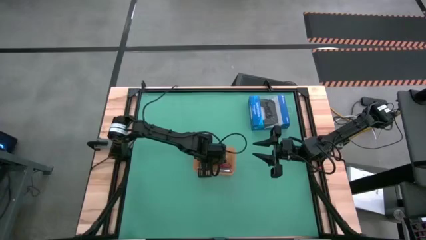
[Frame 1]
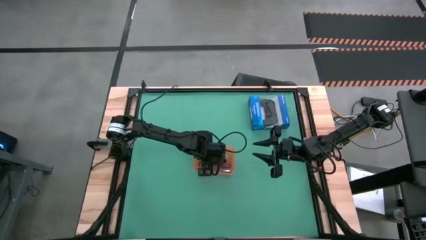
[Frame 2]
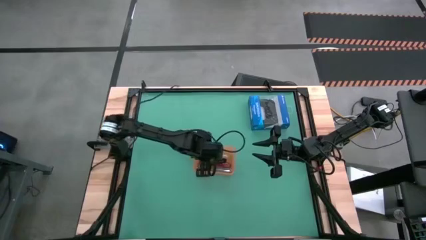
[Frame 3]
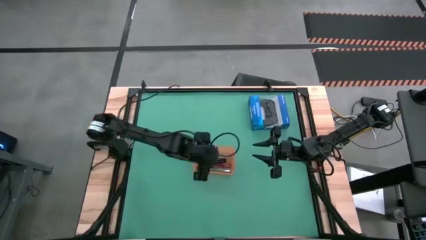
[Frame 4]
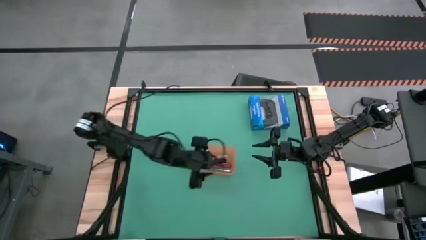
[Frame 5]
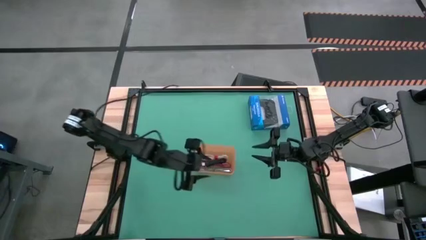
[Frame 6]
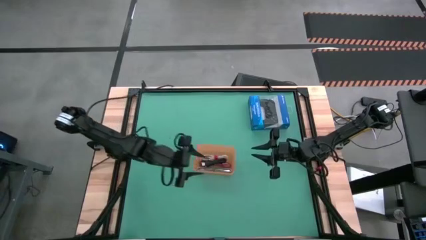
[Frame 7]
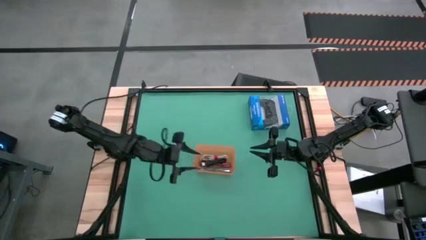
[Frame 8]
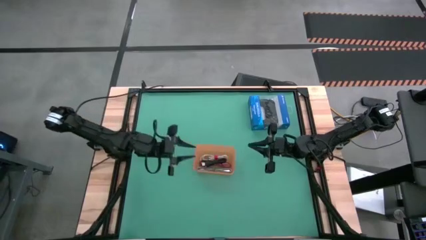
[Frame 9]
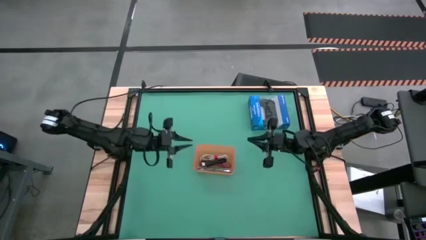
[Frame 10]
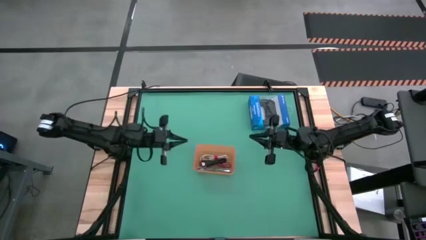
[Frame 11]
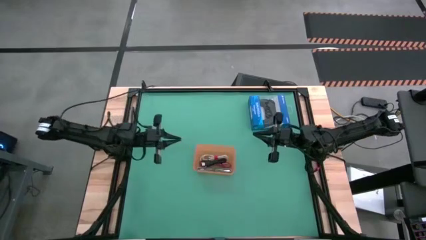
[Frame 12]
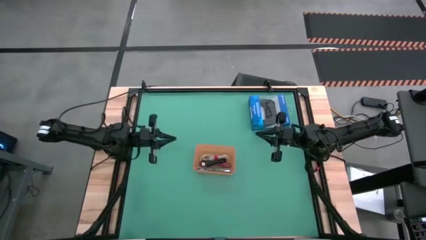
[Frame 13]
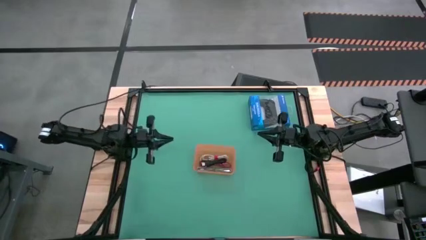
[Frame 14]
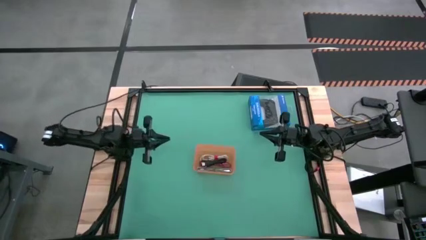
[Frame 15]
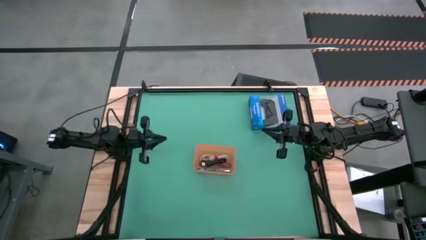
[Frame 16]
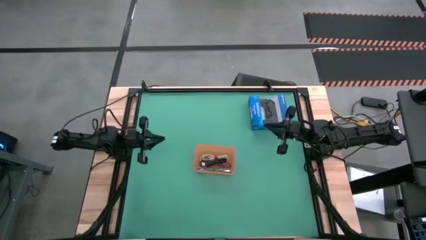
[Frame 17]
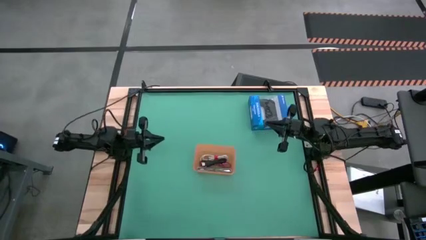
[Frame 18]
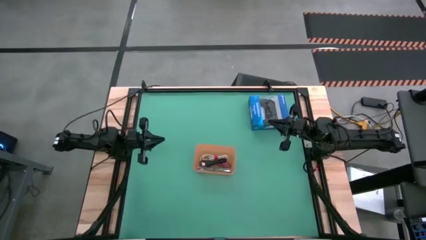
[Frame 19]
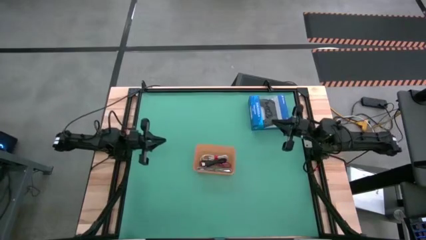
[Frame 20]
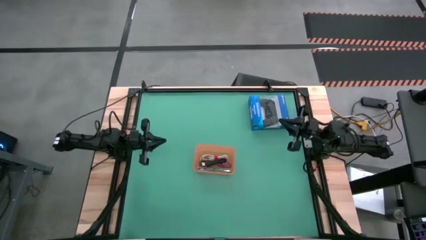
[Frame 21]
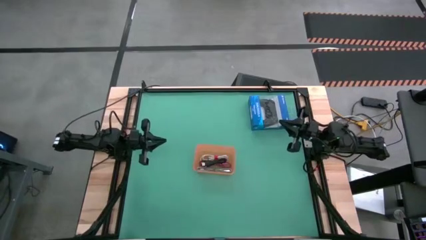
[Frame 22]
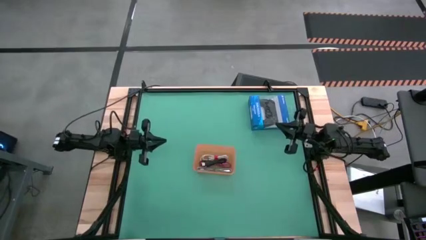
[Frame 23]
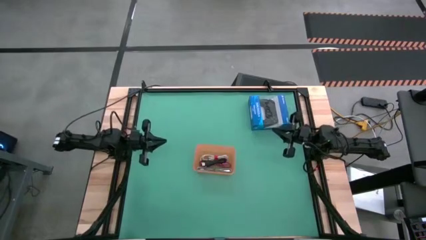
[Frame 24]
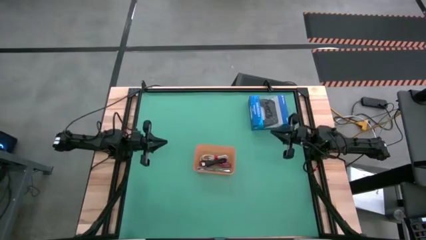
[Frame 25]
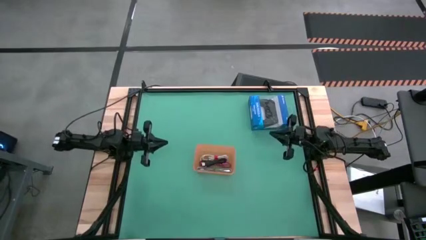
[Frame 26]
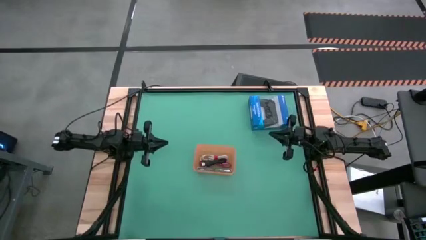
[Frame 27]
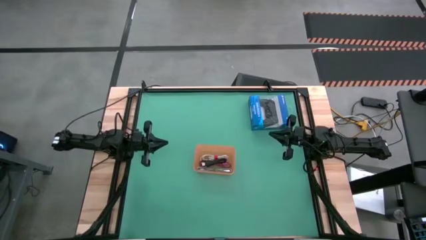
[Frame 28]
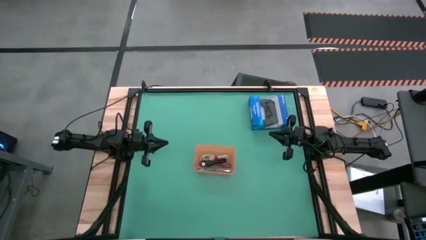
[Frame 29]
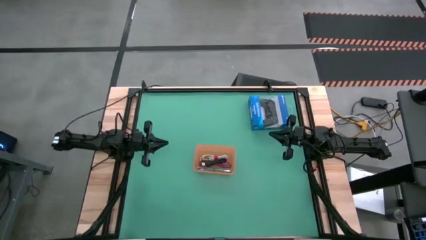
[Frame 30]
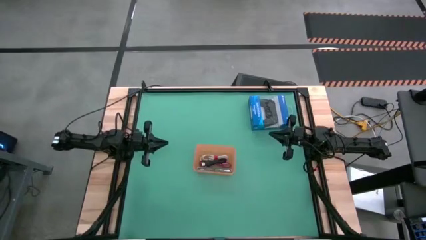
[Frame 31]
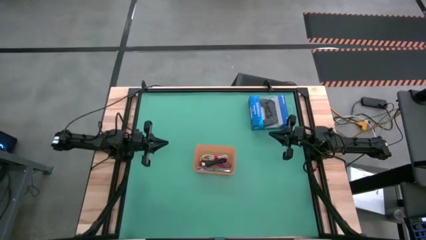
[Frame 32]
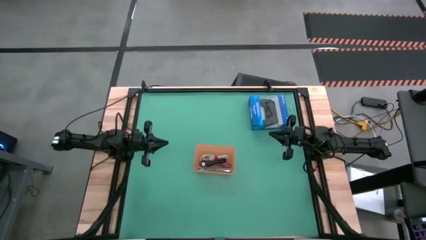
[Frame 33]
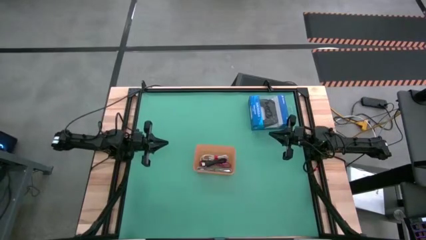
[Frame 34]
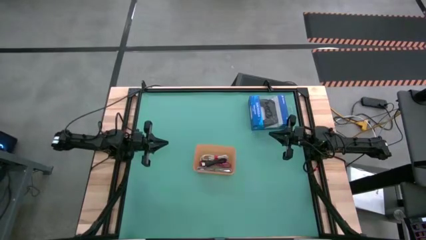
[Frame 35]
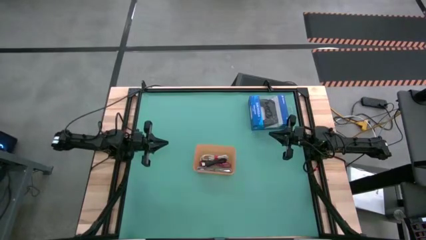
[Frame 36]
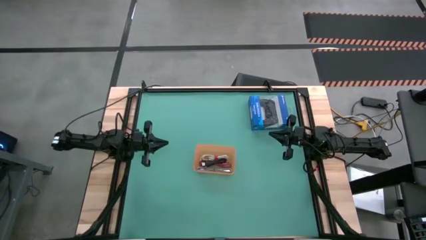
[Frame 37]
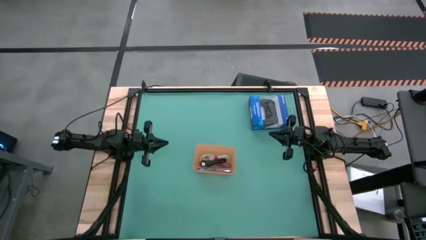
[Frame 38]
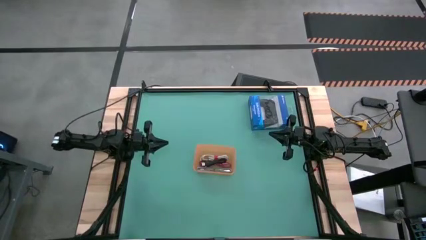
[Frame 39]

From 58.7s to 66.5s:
Task: Pick and place USB-C Cables
Return to Home Position

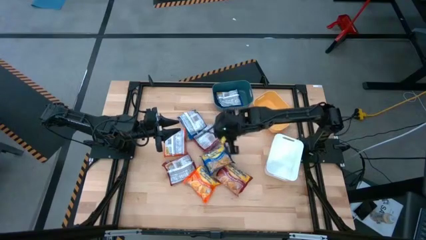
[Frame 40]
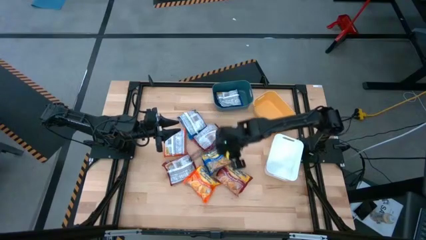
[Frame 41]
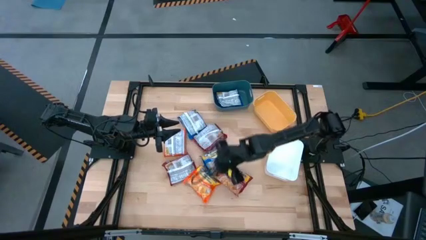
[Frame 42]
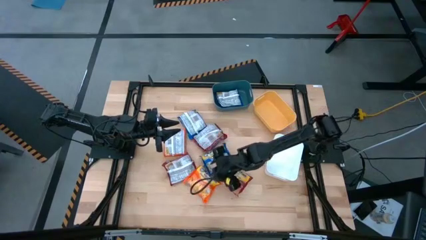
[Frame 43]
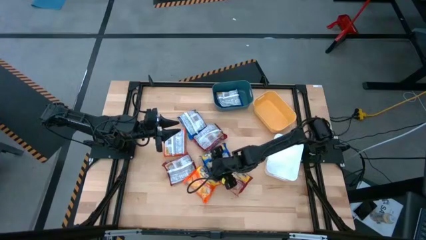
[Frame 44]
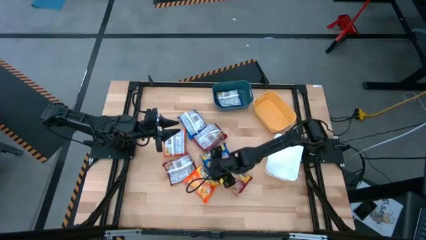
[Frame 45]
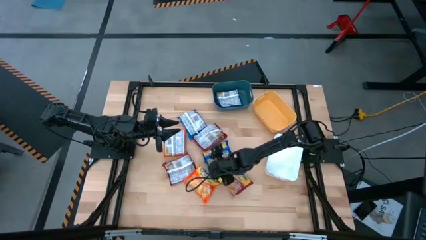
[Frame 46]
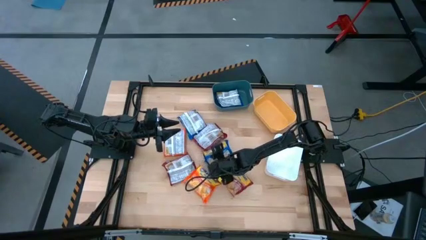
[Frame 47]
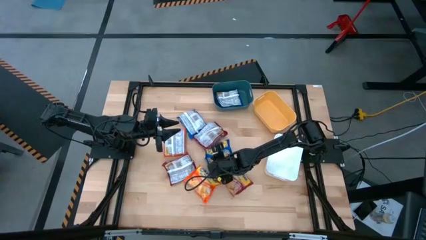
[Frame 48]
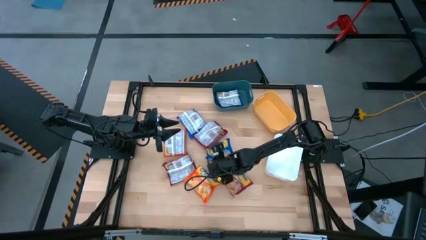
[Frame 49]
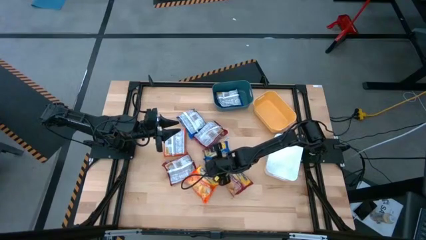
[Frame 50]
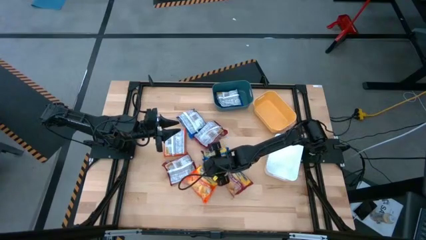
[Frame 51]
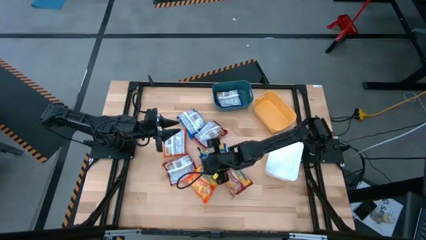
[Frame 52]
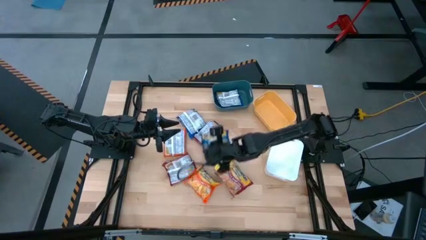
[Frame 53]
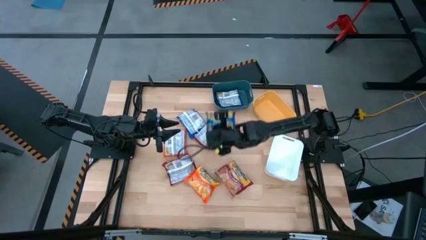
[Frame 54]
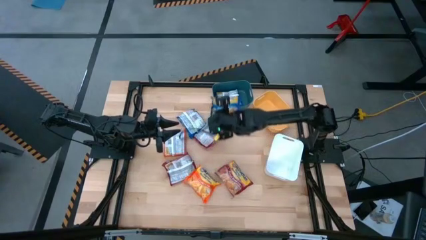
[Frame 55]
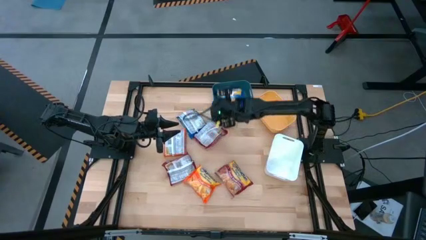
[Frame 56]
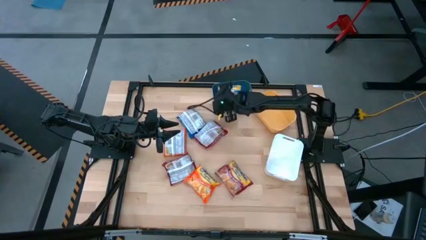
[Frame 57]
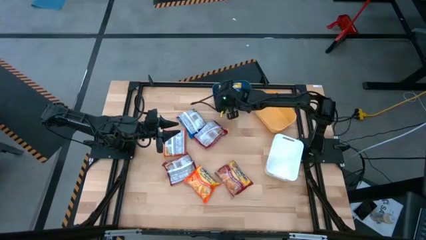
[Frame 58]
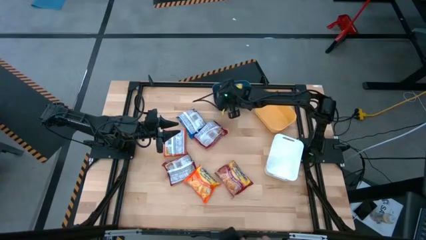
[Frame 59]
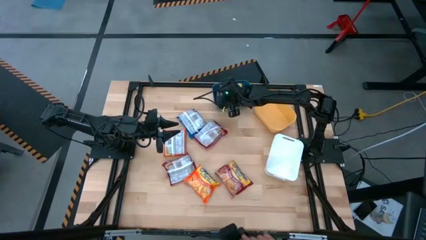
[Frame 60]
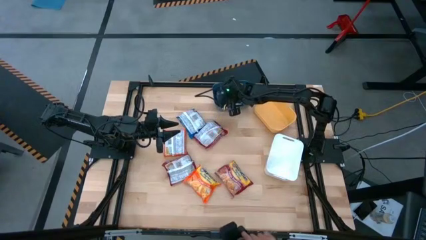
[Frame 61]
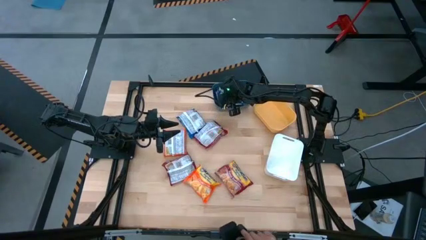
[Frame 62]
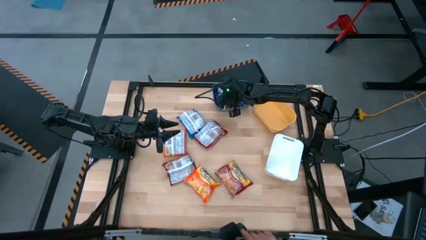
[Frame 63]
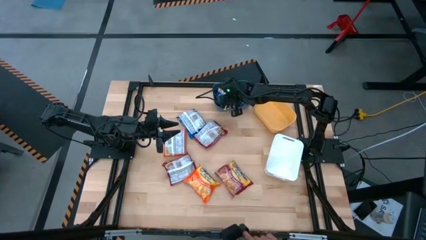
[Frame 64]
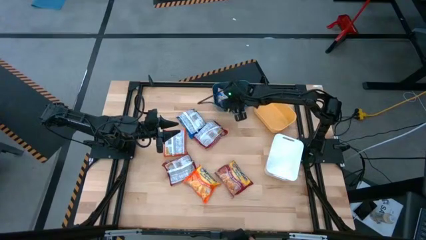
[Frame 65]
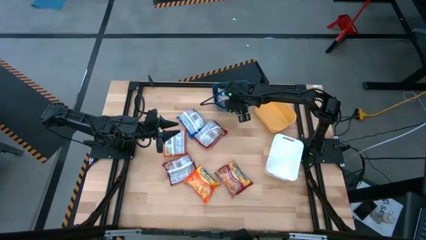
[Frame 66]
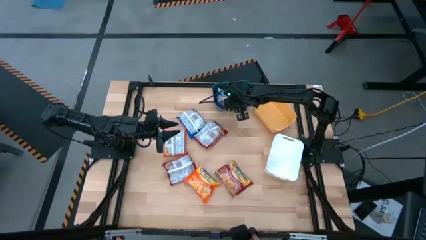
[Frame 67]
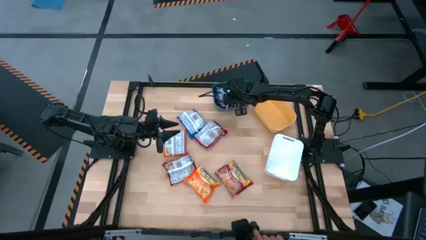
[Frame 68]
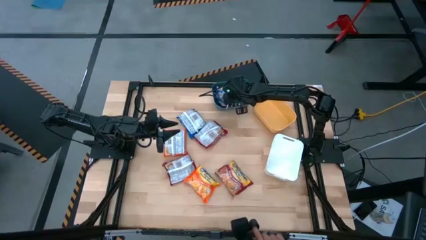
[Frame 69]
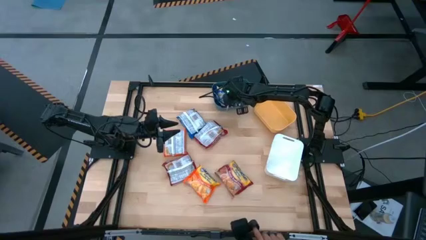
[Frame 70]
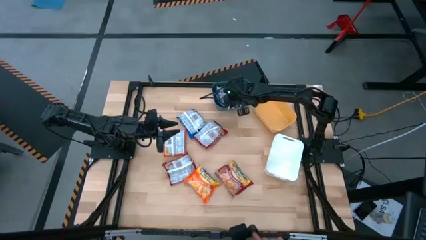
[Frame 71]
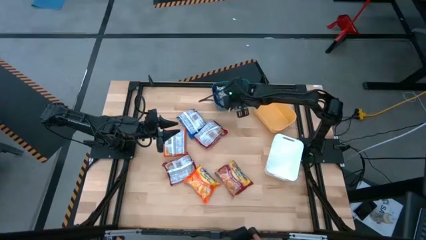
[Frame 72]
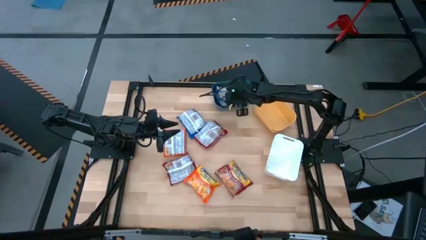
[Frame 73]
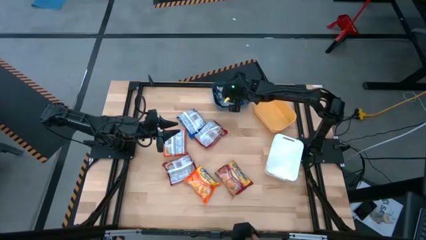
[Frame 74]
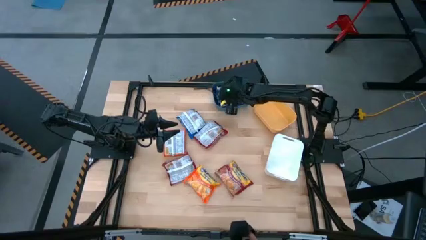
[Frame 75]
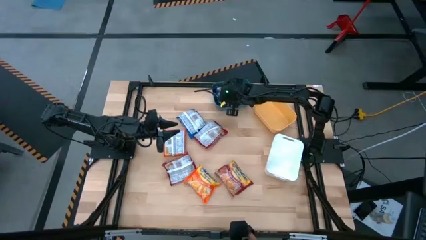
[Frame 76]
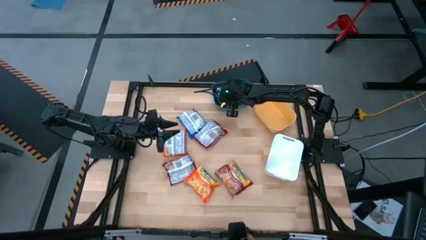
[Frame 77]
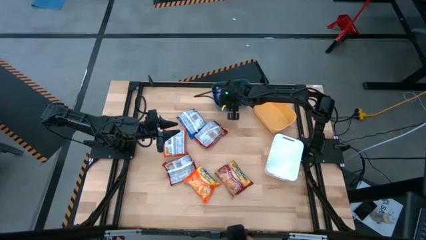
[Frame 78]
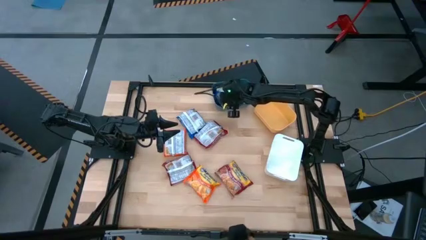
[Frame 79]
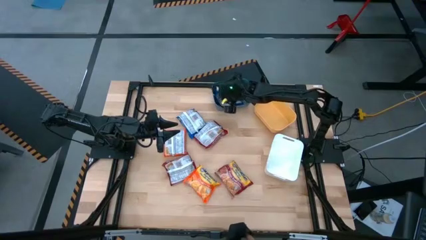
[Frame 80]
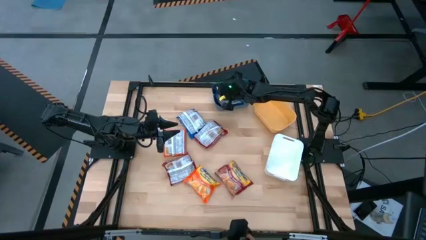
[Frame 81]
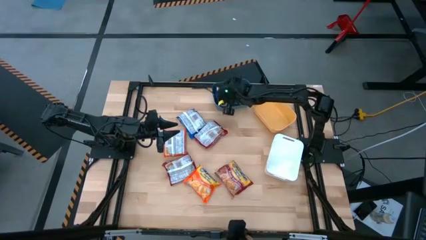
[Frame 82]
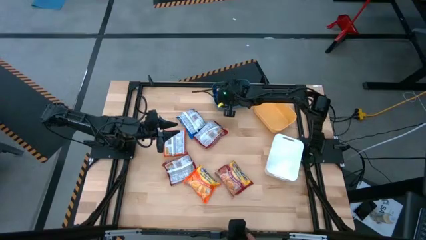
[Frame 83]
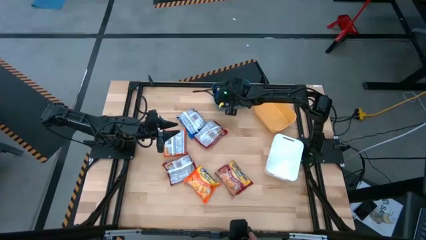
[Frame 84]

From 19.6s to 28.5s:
Task: Sort Maruchan noodles
Put the bottom blue noodle pack into the blue bin
